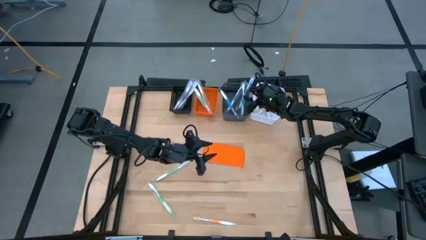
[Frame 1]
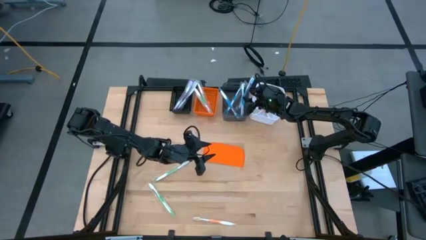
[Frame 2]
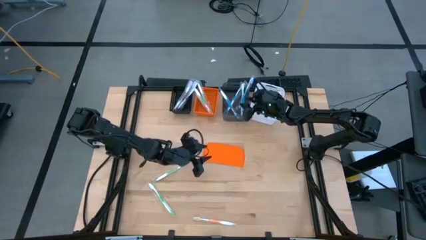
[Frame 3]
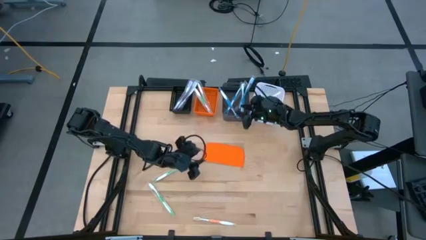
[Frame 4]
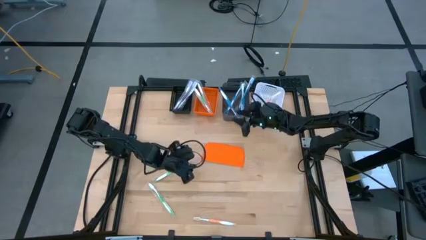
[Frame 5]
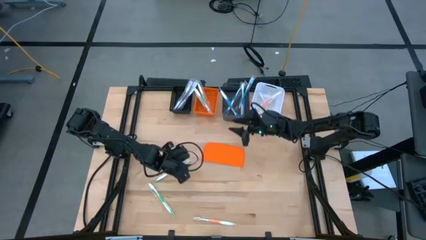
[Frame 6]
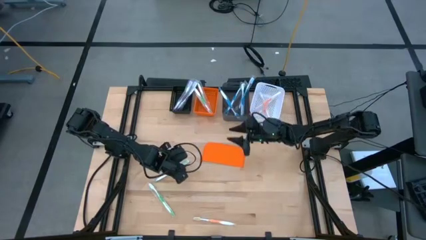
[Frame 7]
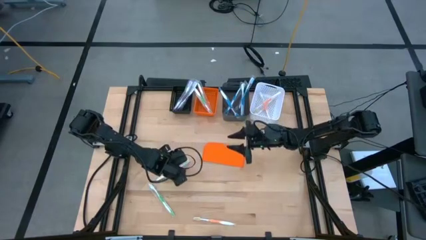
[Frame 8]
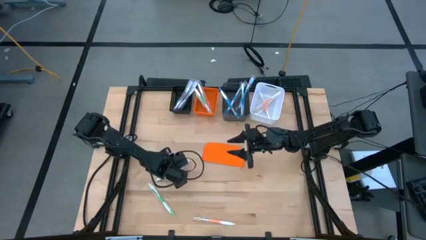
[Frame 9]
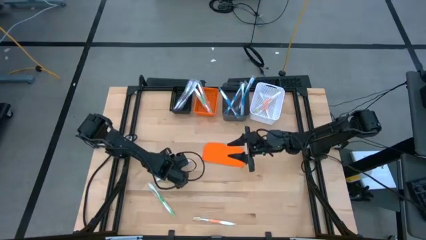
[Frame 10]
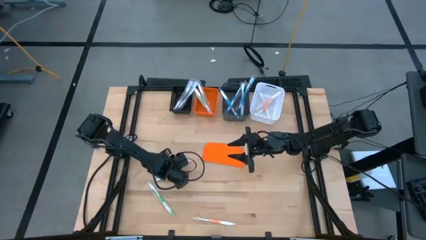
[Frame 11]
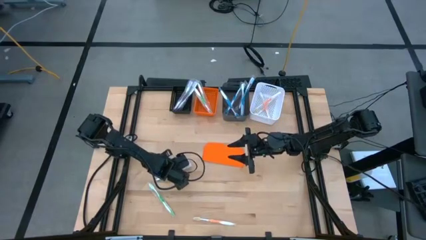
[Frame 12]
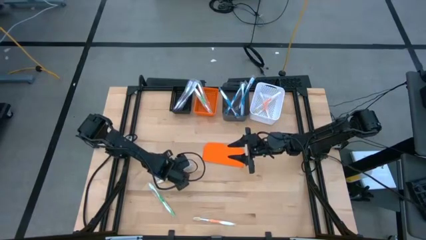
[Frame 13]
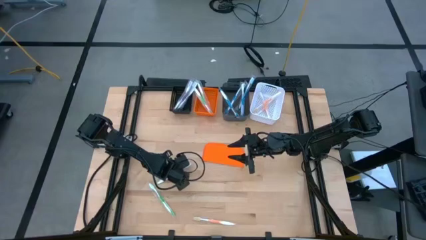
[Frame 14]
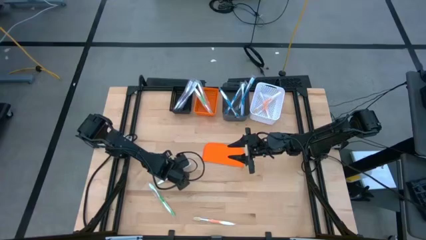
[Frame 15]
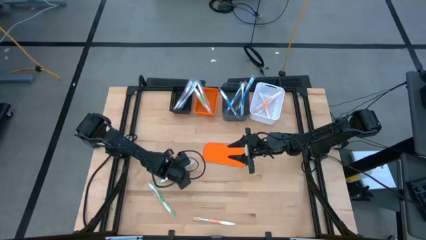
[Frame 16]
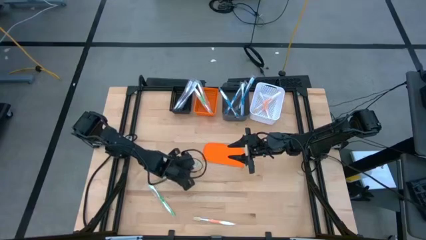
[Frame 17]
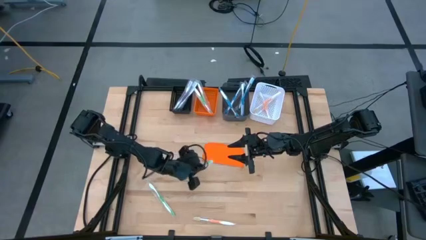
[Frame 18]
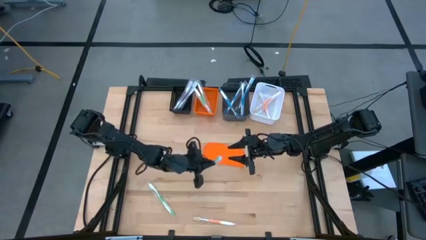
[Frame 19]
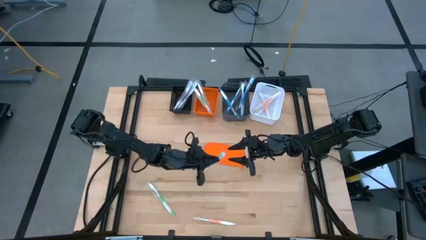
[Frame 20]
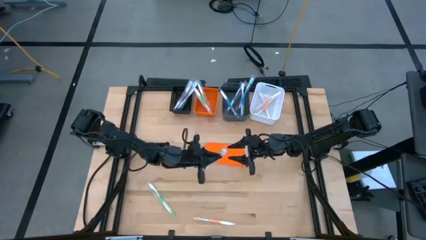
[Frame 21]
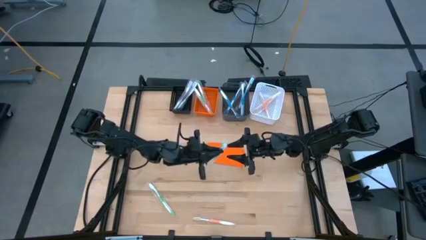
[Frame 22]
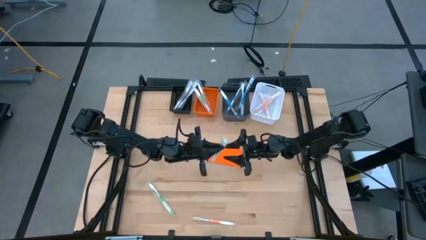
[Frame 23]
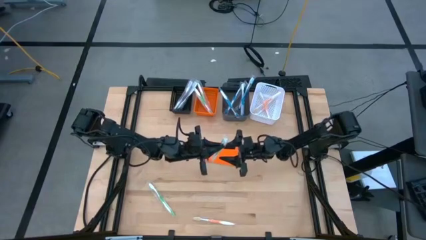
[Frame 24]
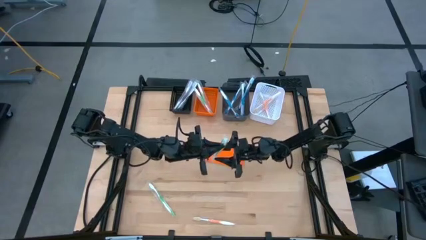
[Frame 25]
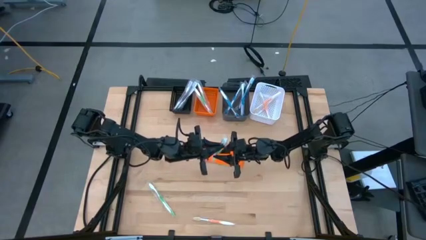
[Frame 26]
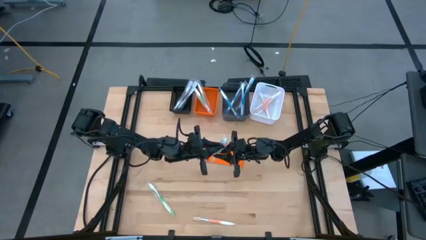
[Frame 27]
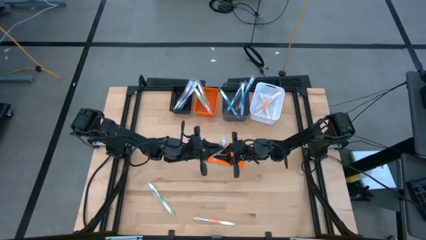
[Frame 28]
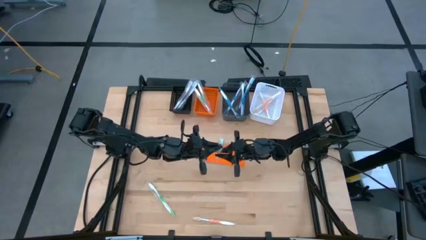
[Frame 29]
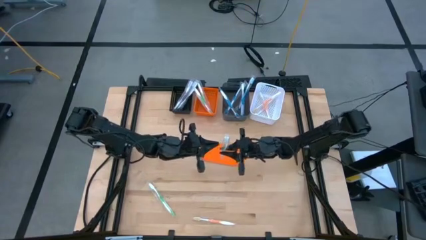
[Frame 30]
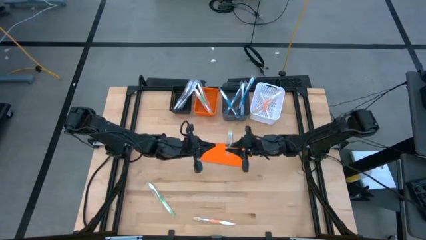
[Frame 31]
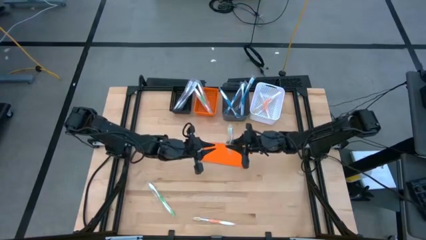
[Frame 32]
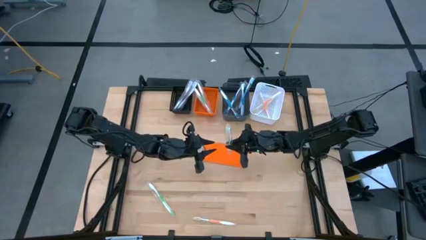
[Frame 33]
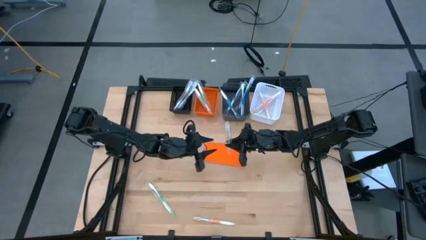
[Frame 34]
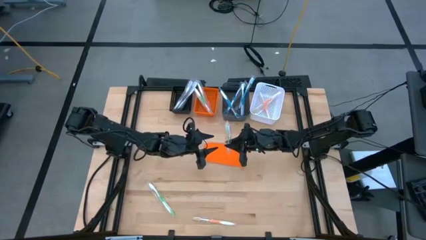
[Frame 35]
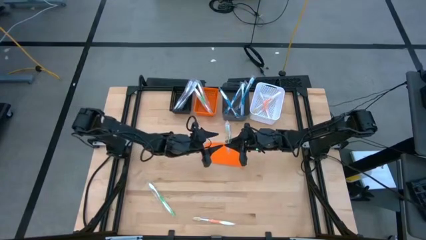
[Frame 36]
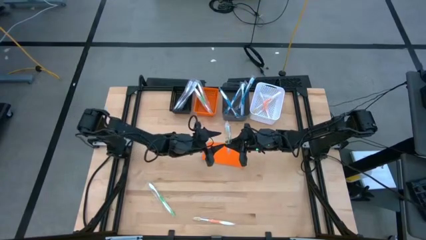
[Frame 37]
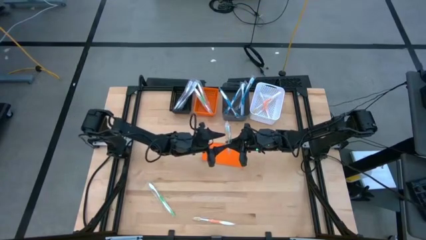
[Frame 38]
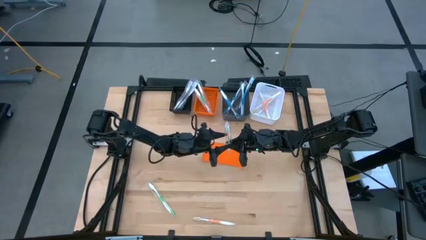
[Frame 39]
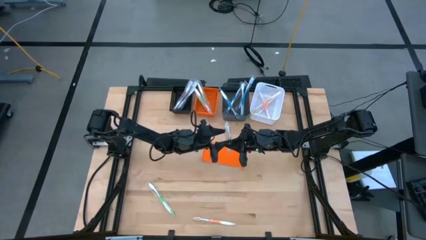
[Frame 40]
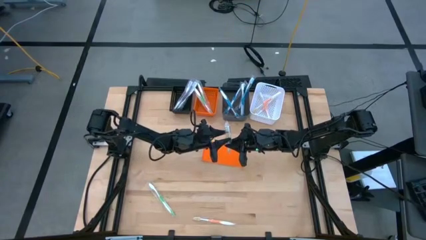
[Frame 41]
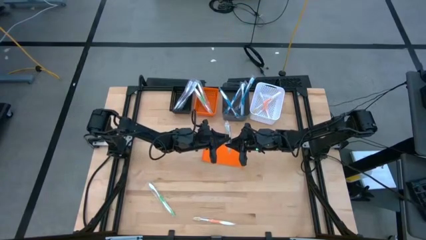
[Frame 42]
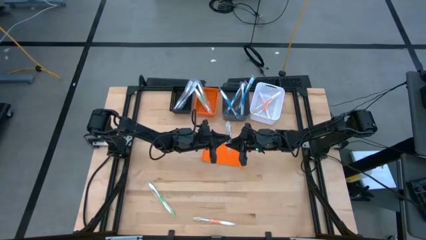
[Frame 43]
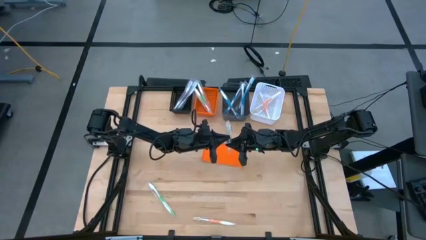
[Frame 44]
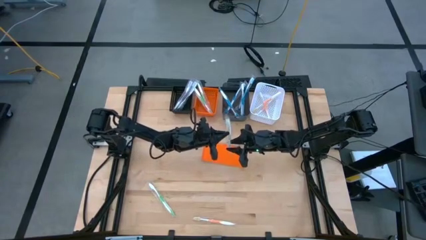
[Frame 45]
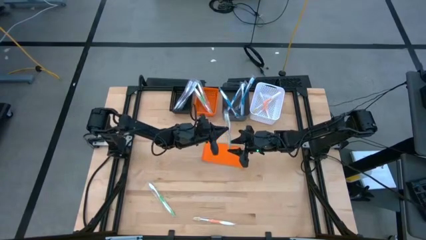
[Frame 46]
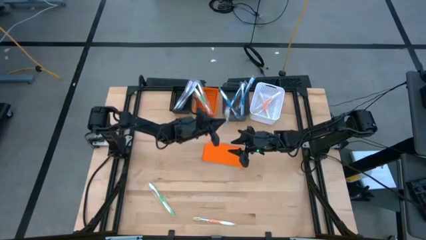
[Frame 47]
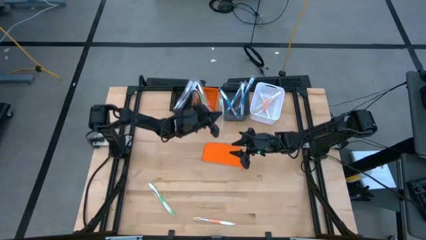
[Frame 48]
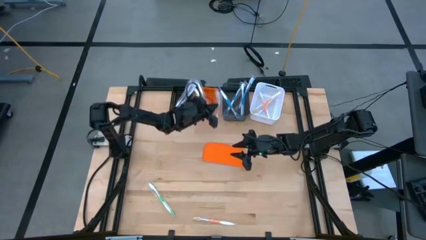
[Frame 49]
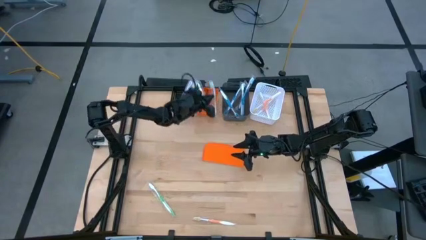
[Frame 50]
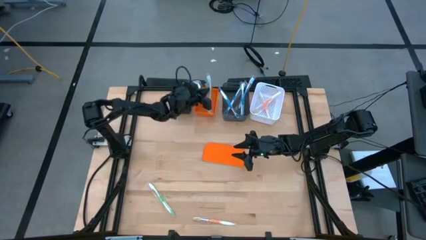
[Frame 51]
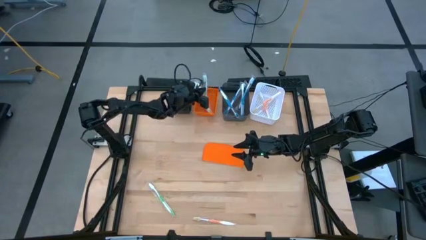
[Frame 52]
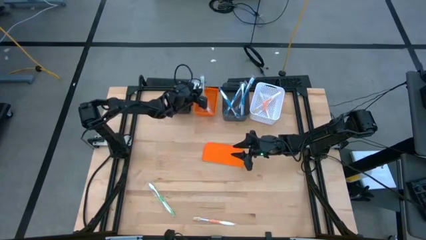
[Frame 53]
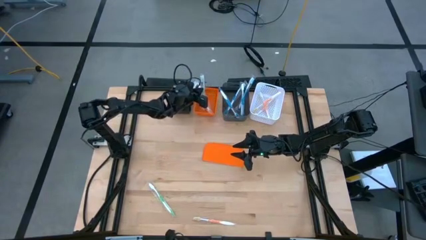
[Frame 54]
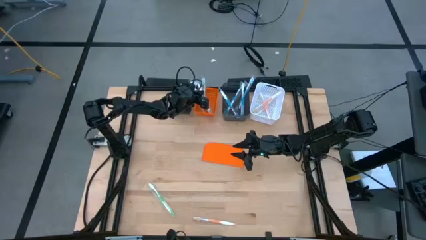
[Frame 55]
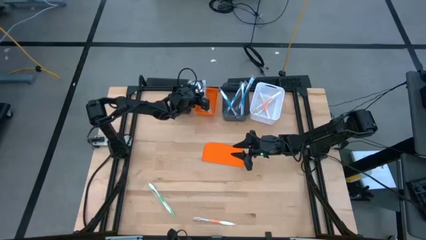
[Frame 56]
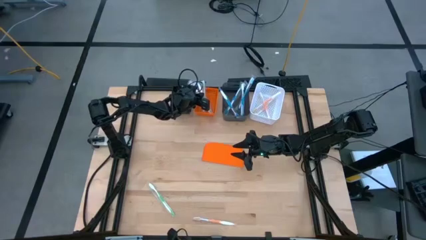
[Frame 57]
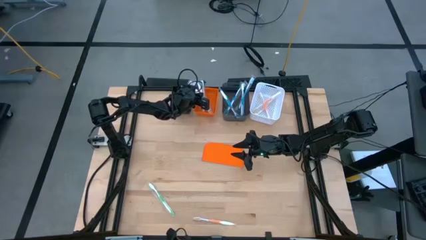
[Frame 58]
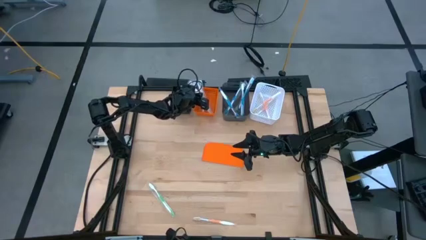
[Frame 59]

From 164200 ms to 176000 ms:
Task: Pick & Place Toothbrushes
Put the green toothbrush into the orange bin
